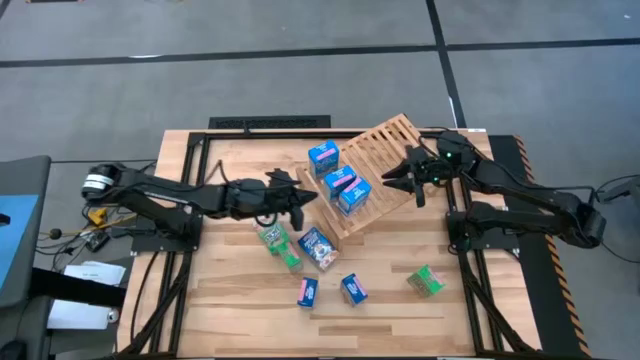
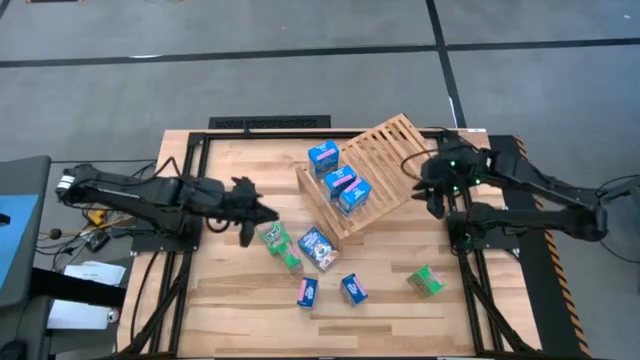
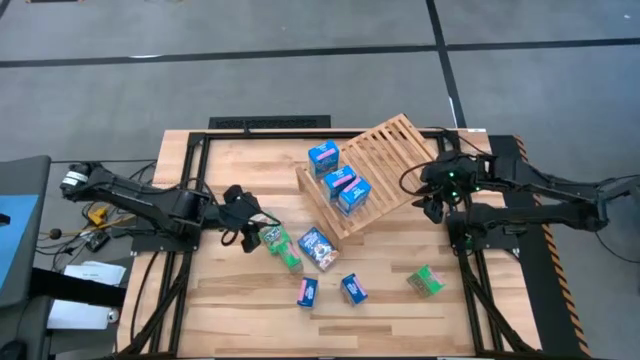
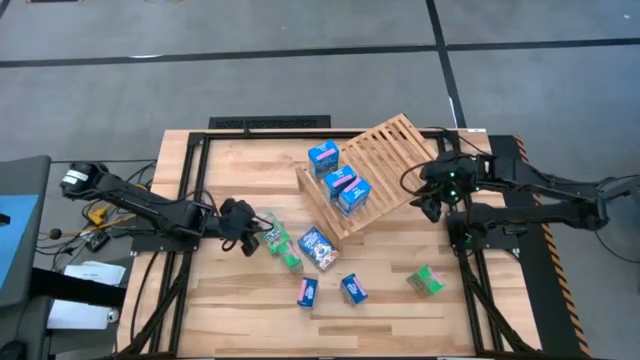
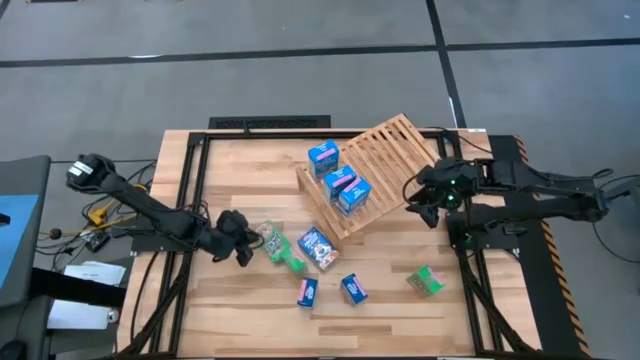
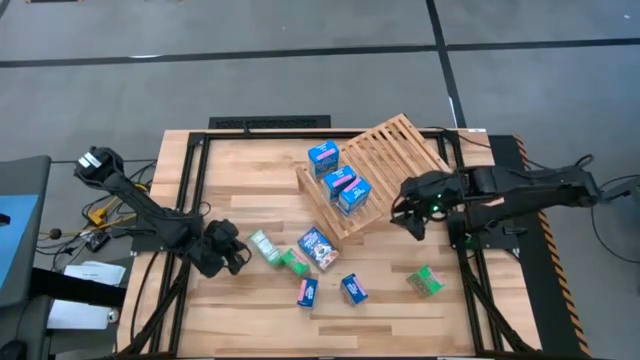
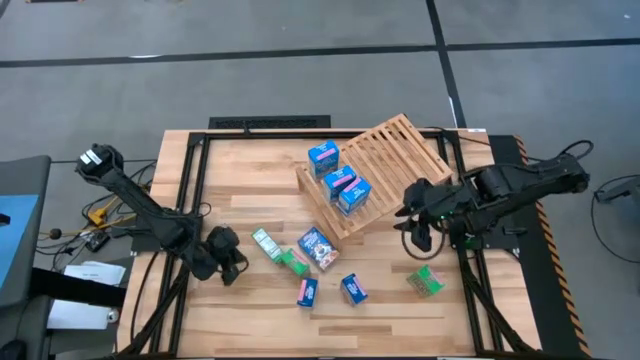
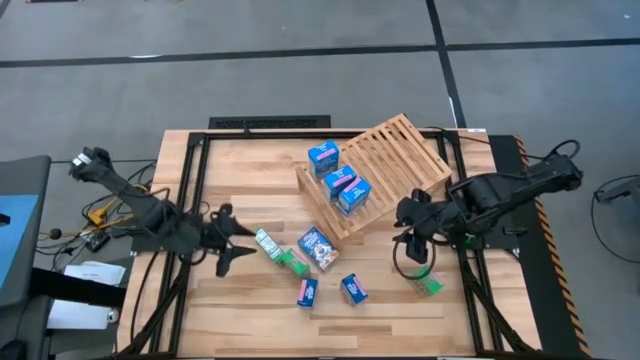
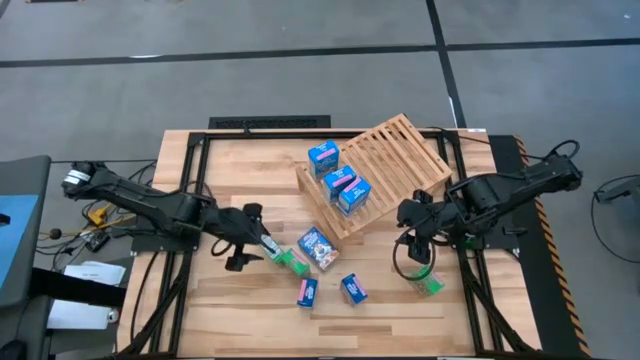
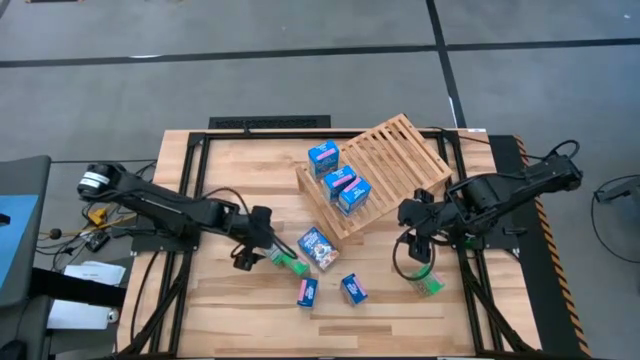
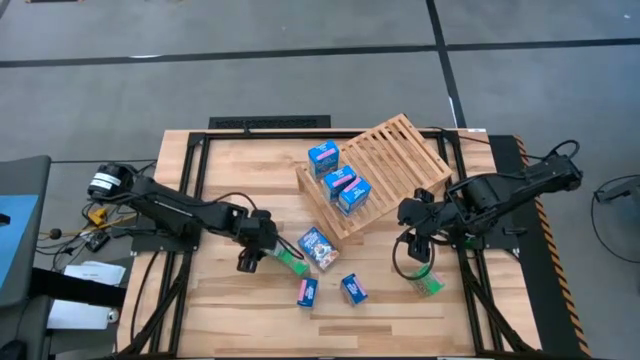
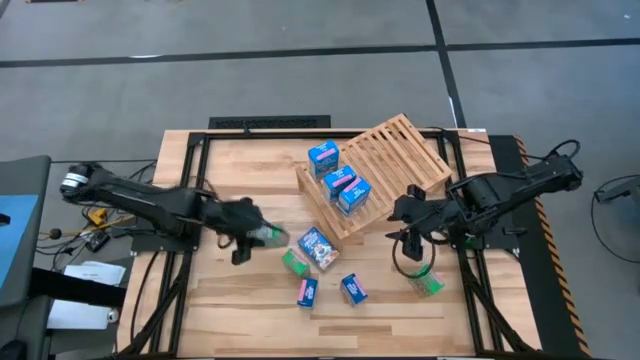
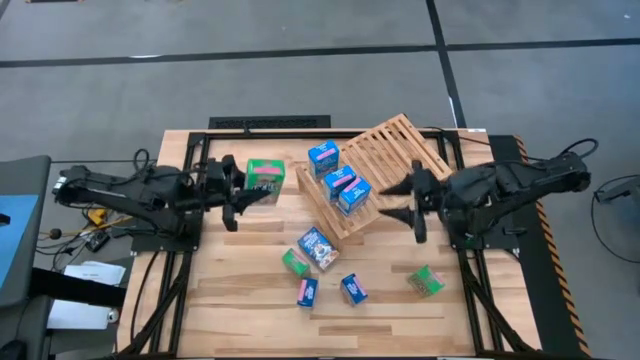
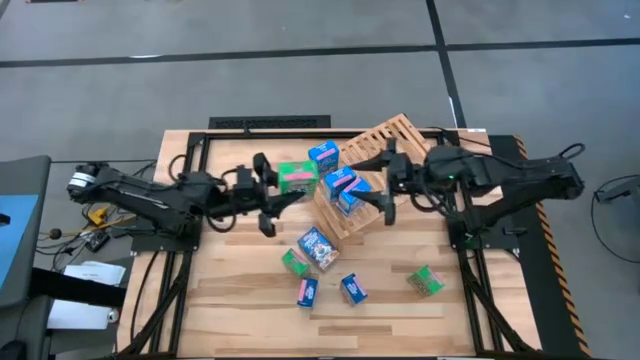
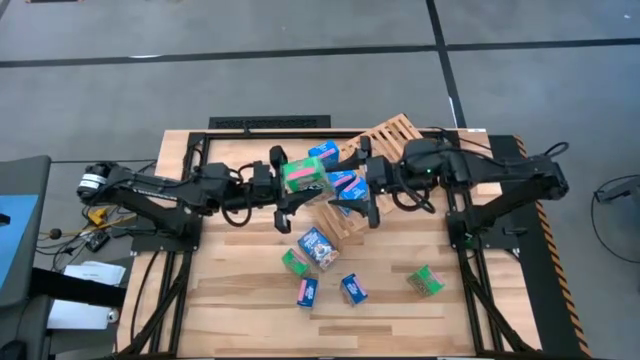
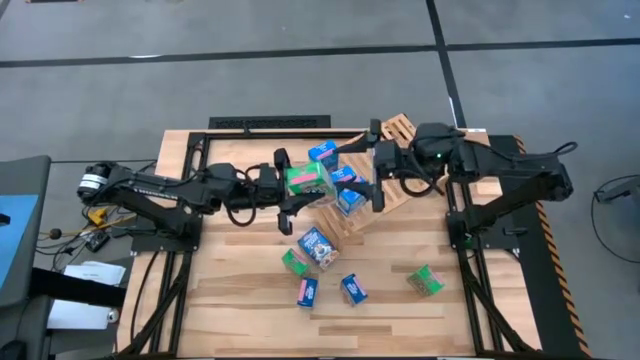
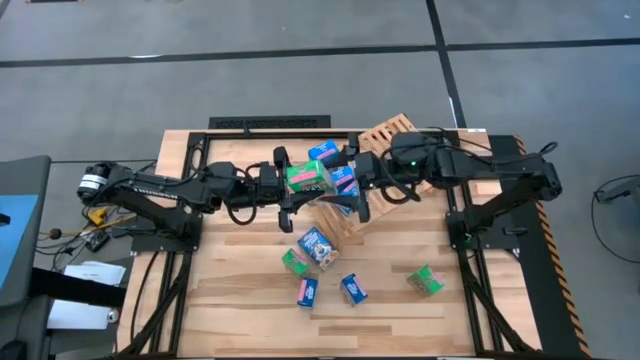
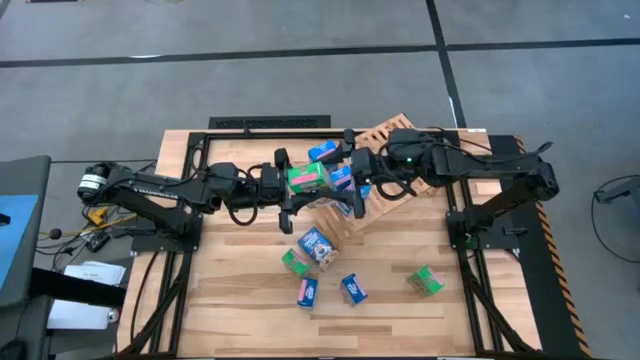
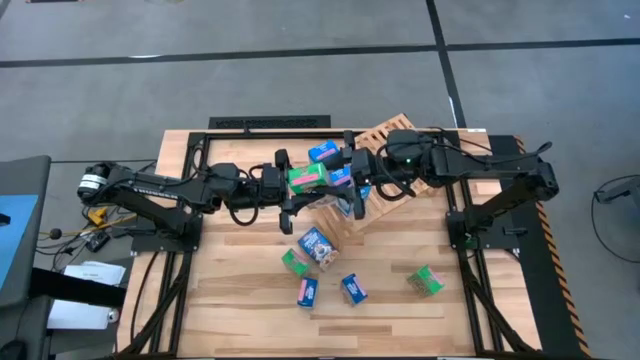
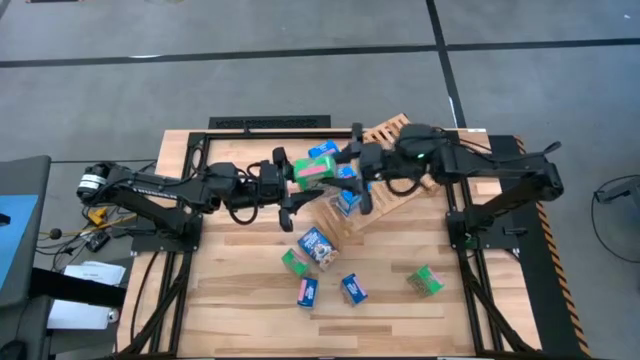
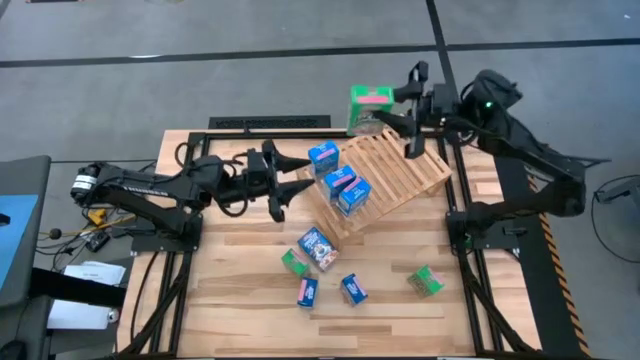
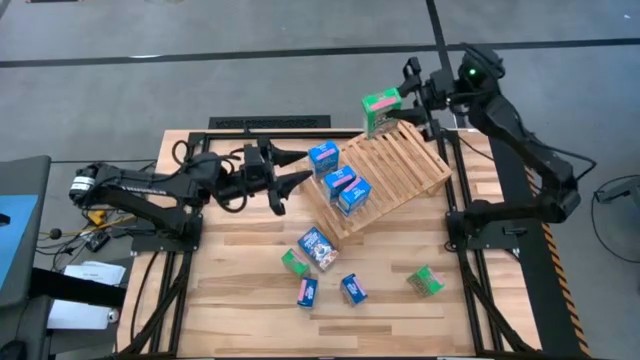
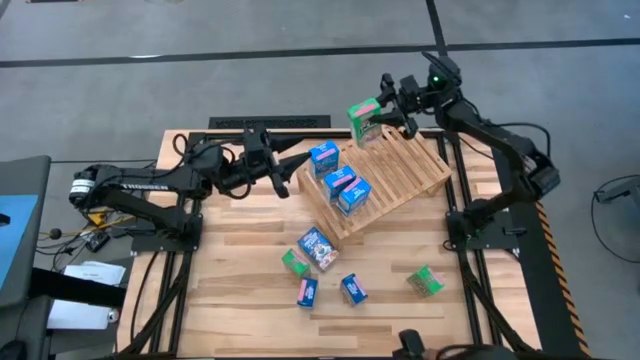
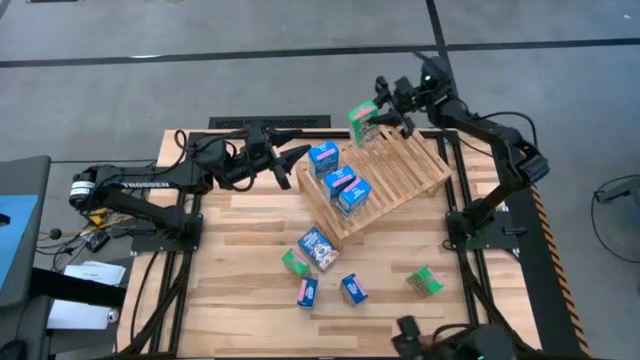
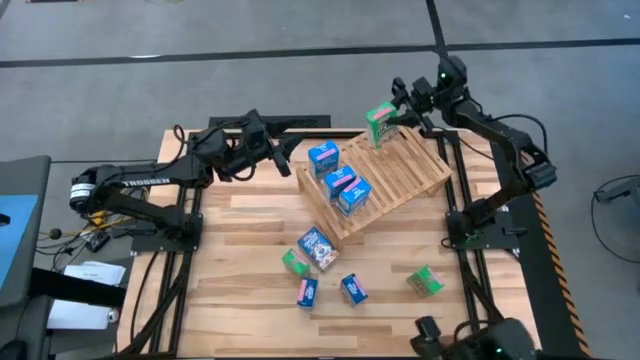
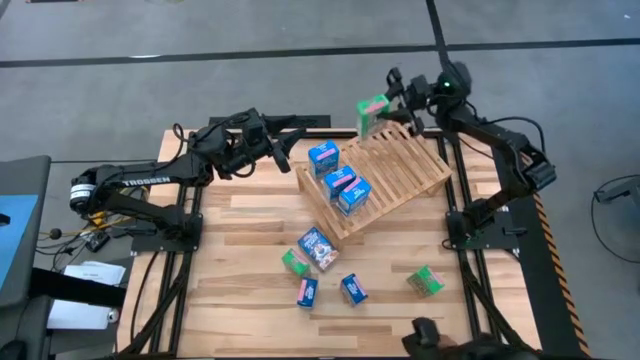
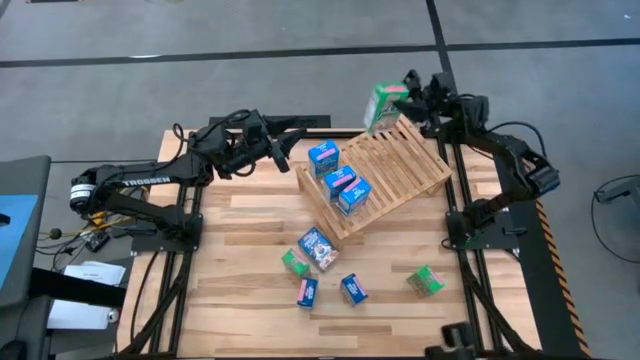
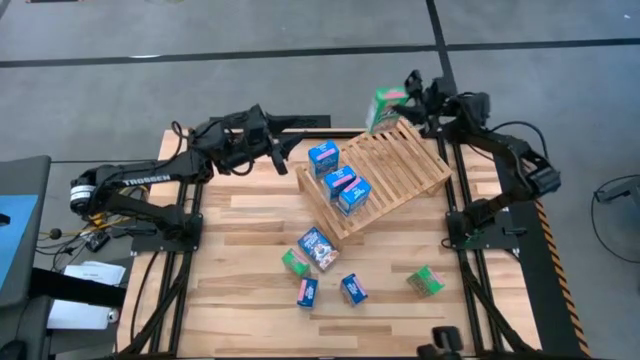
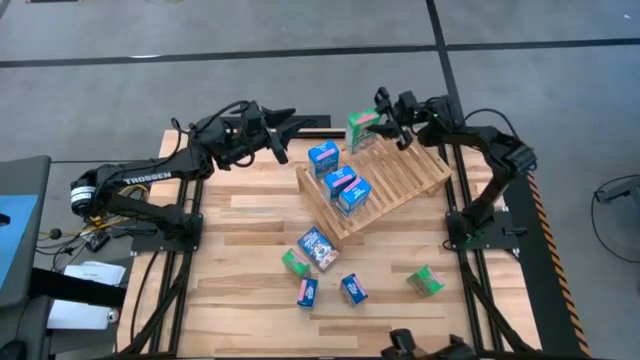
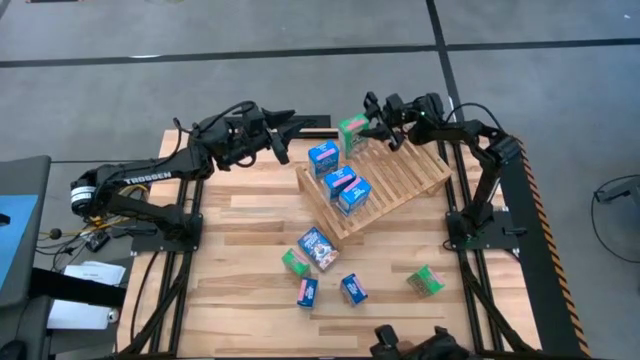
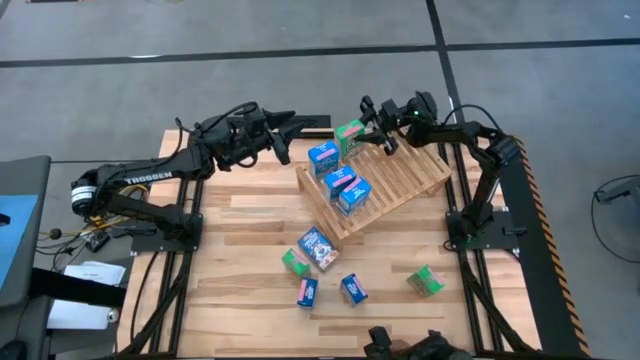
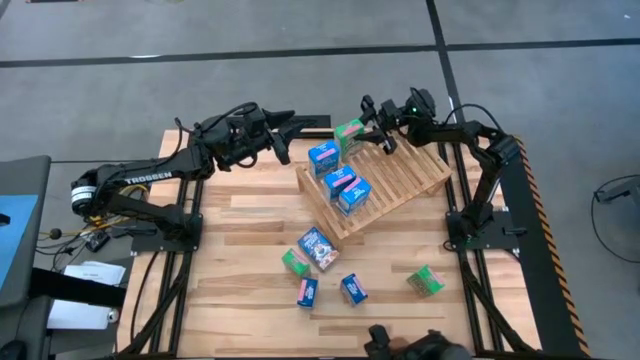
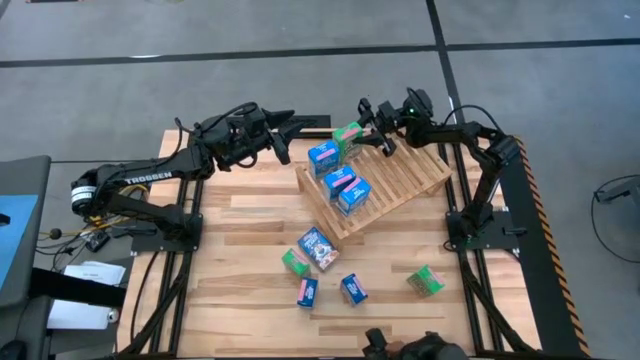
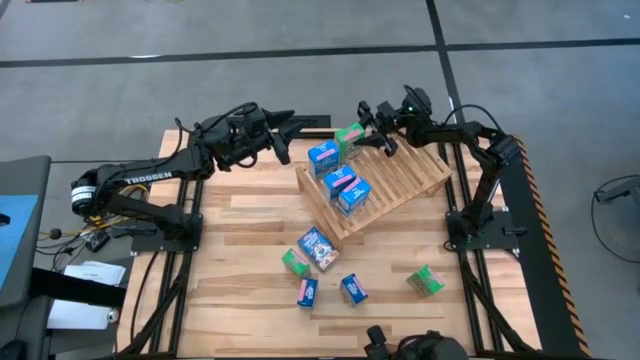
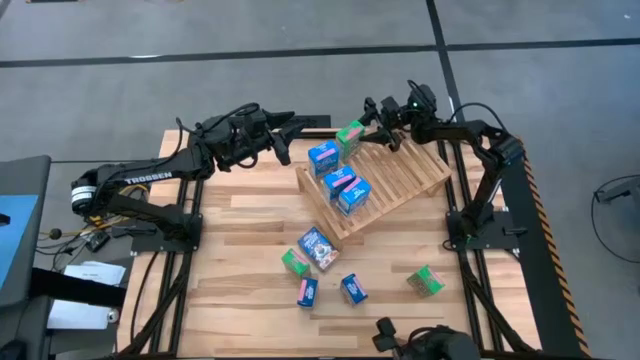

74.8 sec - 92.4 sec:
Task: Stack cereal on shelf
Put the top green cereal box on the shelf

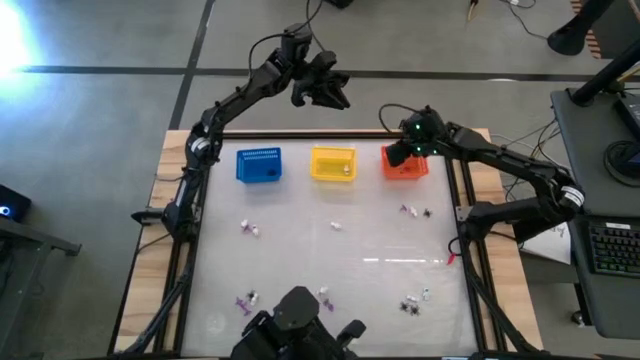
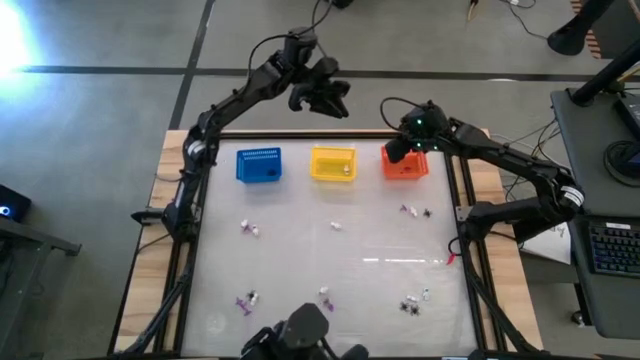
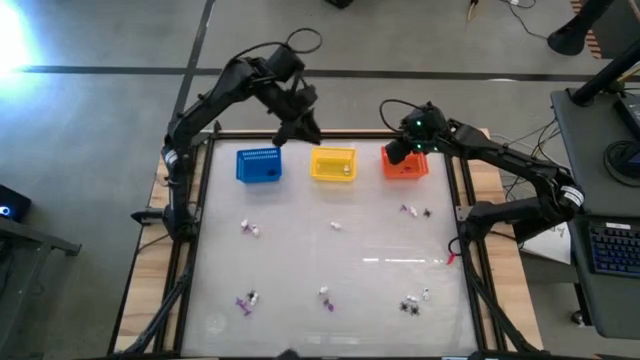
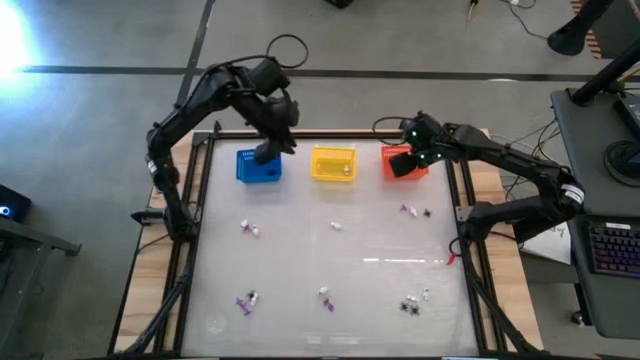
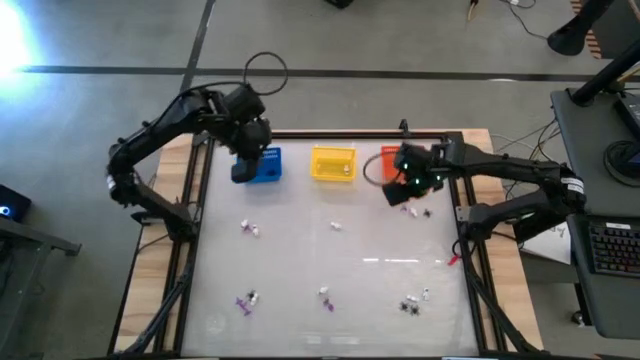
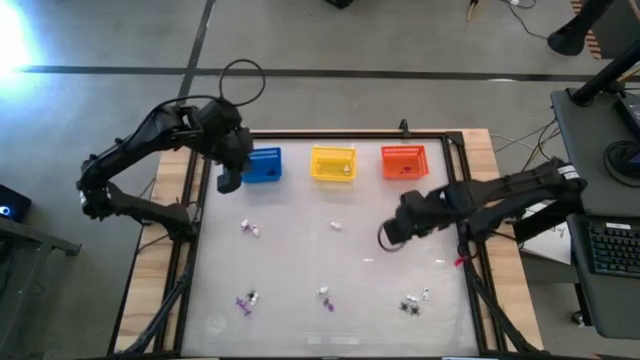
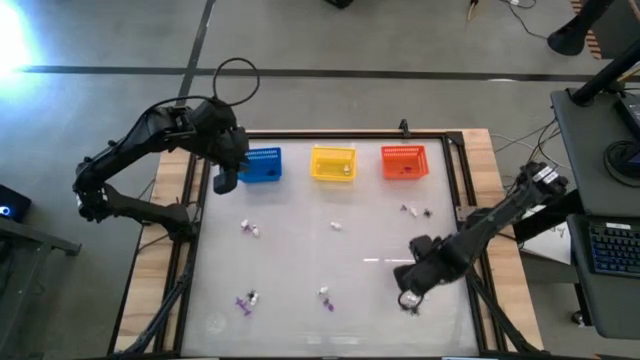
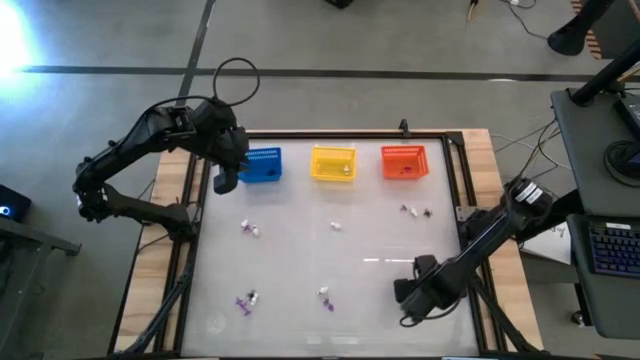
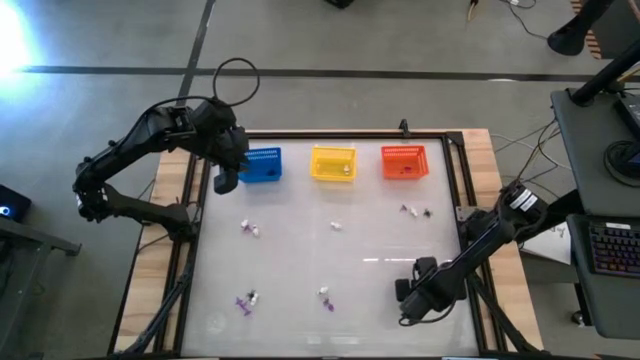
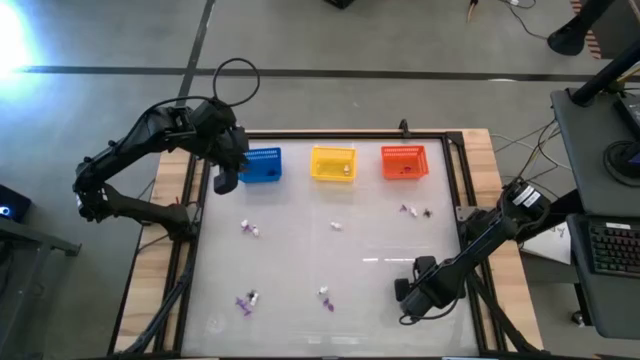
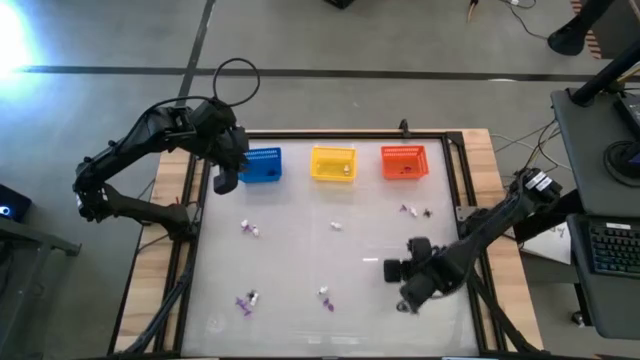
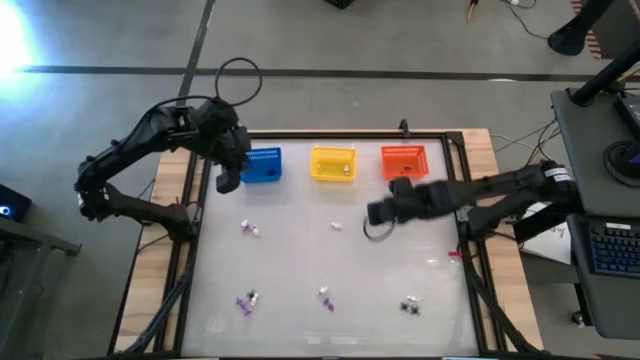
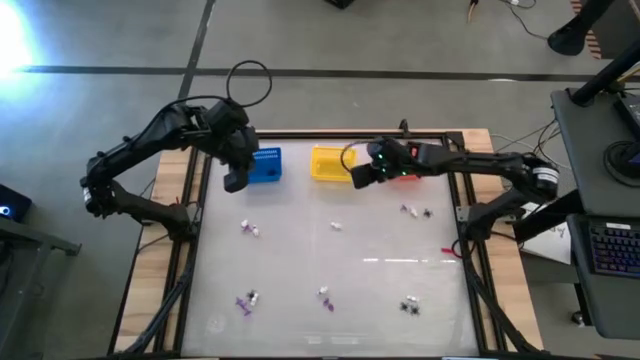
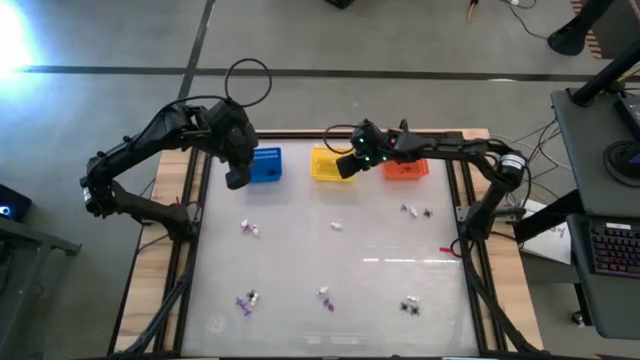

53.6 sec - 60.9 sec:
Task: Sort Halloween decoration
Put the white skeleton toy into the yellow bin
